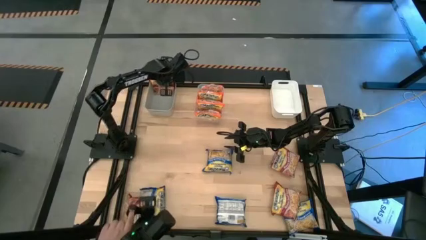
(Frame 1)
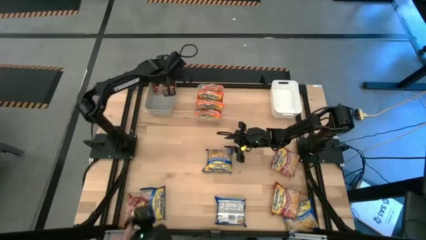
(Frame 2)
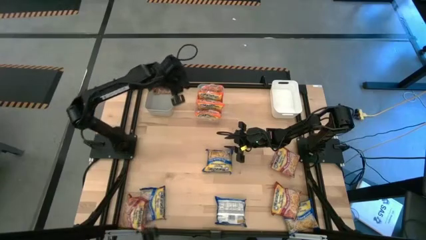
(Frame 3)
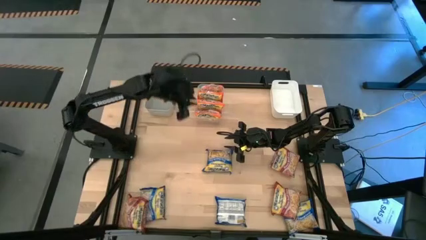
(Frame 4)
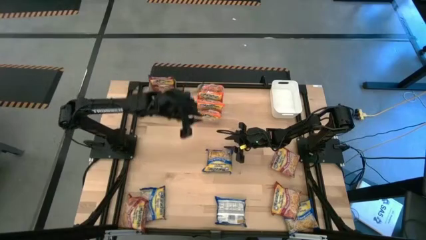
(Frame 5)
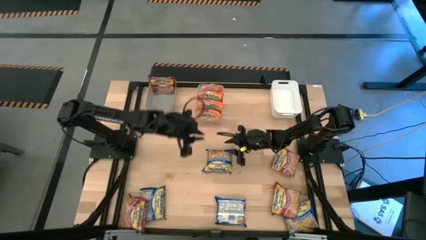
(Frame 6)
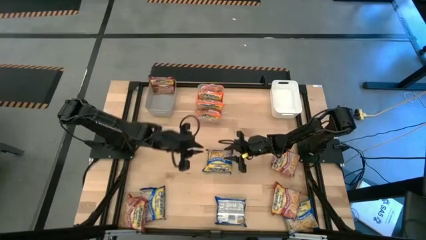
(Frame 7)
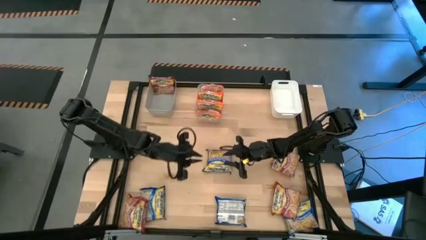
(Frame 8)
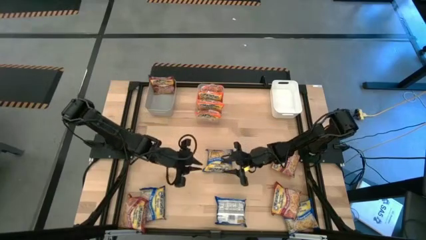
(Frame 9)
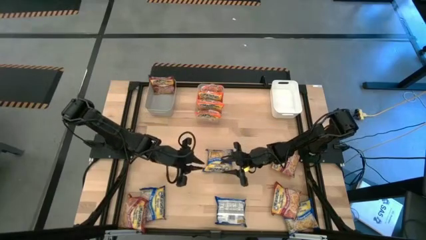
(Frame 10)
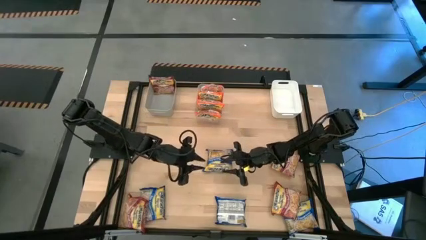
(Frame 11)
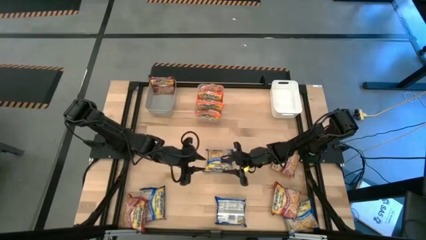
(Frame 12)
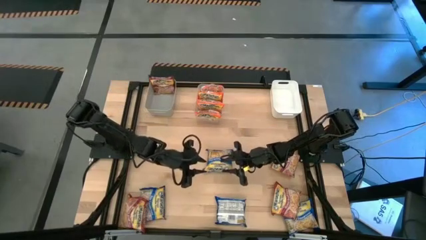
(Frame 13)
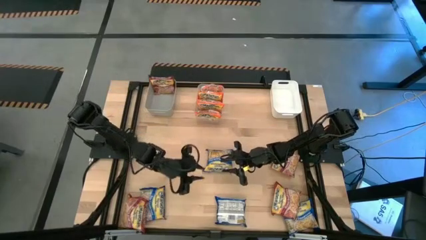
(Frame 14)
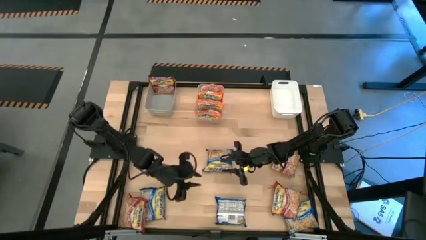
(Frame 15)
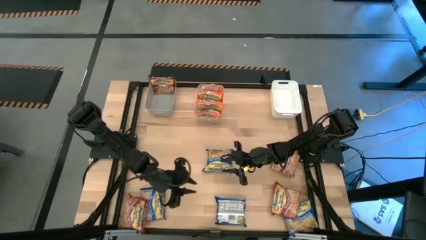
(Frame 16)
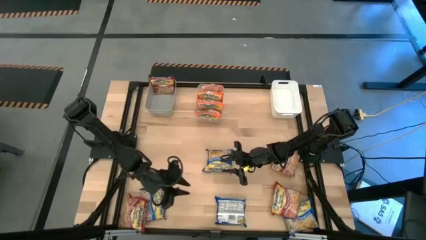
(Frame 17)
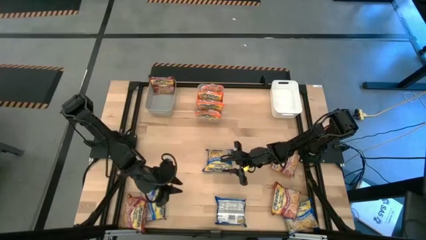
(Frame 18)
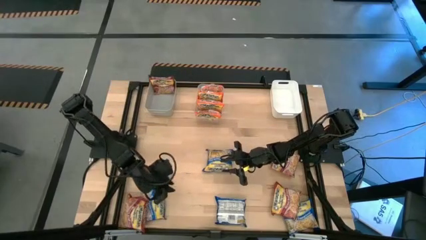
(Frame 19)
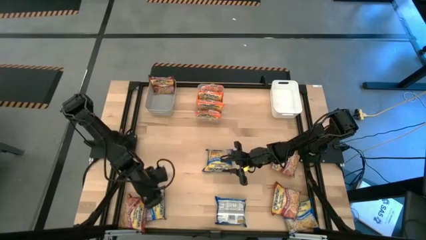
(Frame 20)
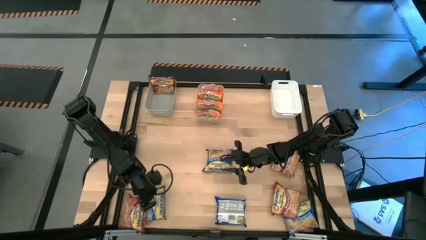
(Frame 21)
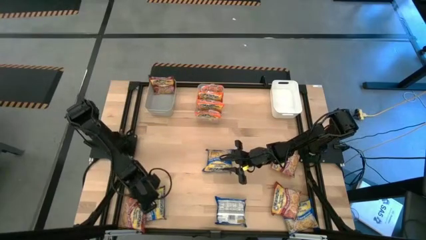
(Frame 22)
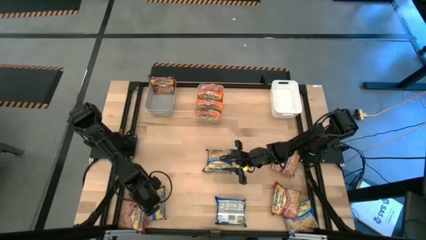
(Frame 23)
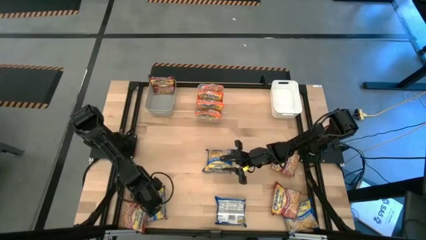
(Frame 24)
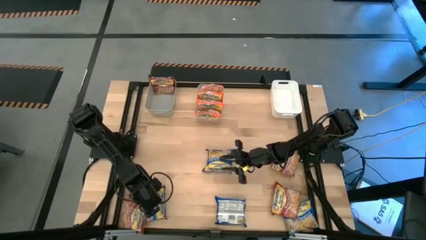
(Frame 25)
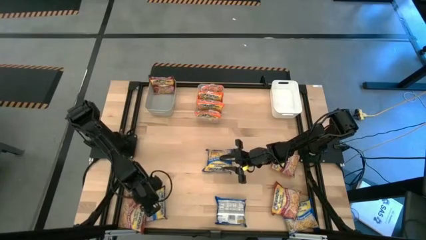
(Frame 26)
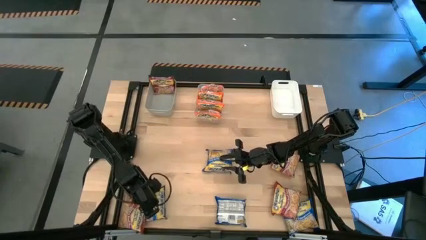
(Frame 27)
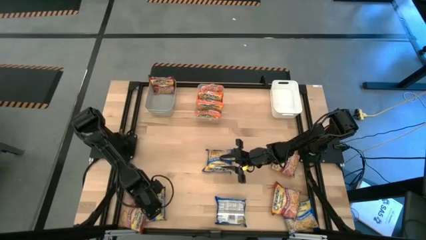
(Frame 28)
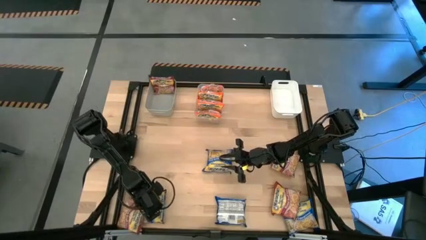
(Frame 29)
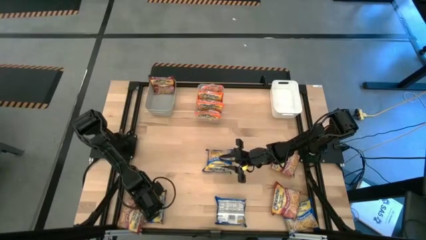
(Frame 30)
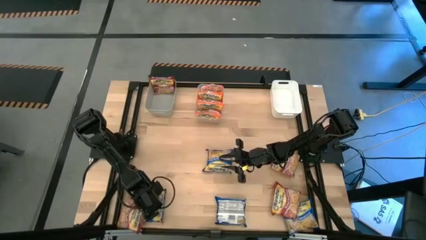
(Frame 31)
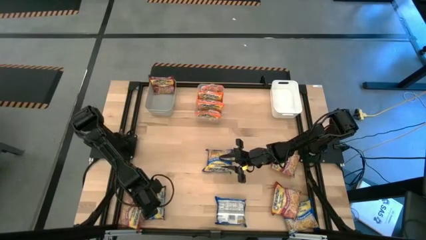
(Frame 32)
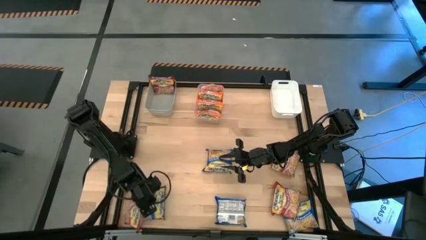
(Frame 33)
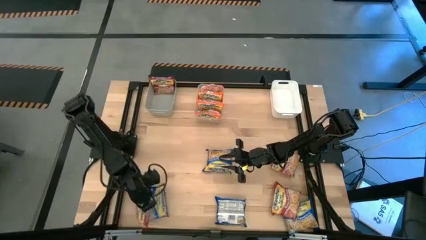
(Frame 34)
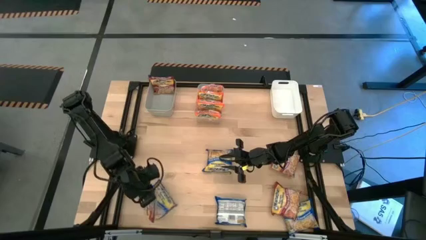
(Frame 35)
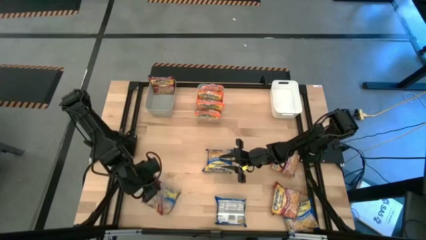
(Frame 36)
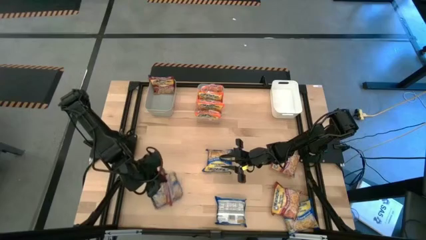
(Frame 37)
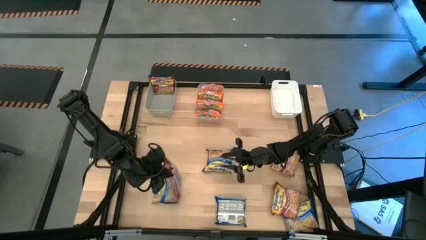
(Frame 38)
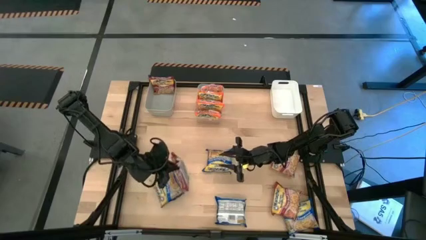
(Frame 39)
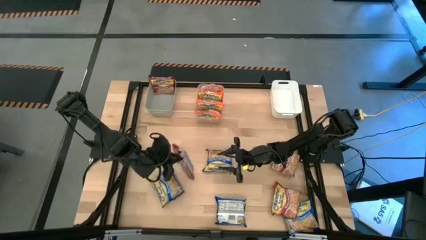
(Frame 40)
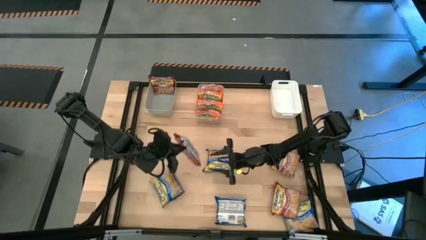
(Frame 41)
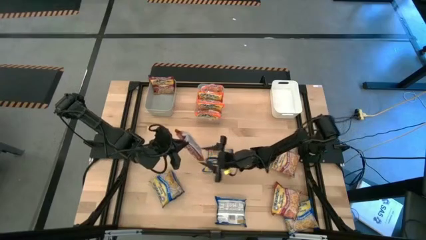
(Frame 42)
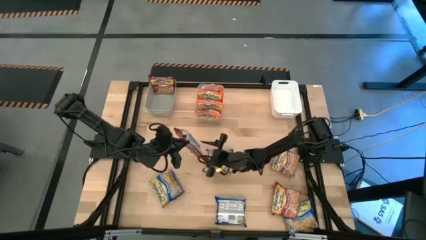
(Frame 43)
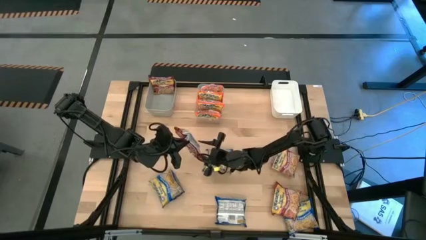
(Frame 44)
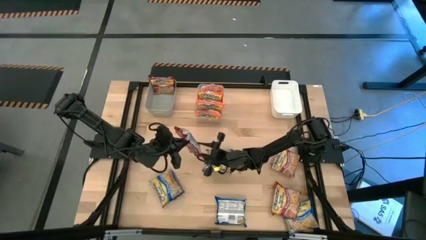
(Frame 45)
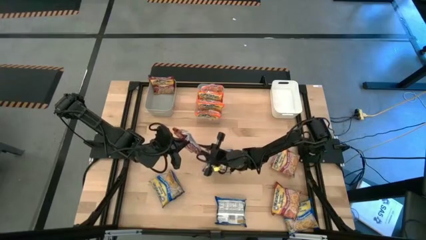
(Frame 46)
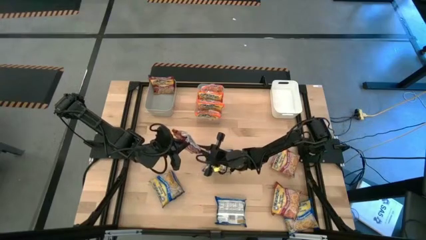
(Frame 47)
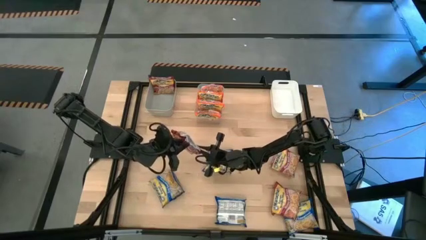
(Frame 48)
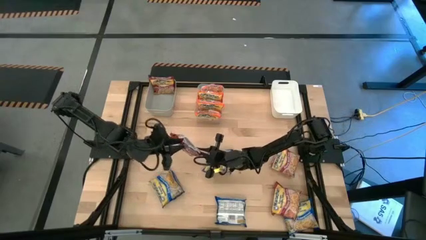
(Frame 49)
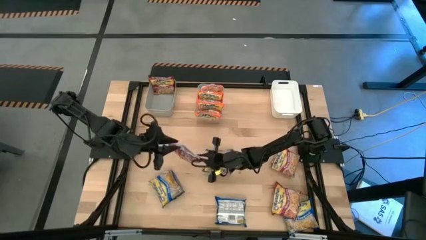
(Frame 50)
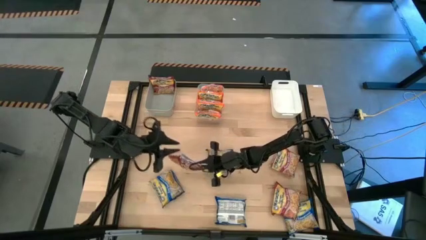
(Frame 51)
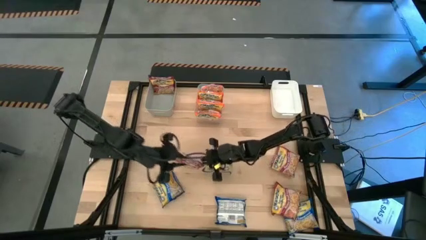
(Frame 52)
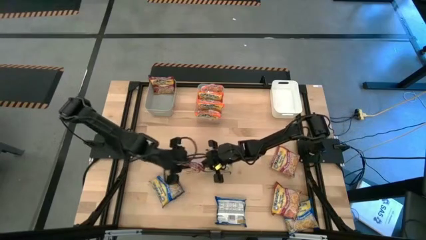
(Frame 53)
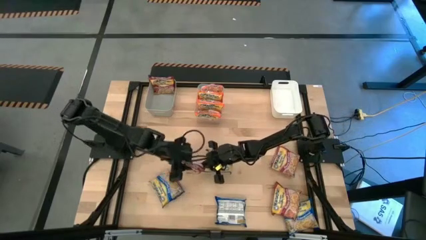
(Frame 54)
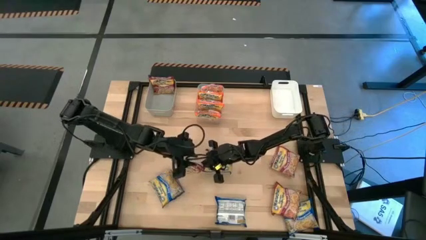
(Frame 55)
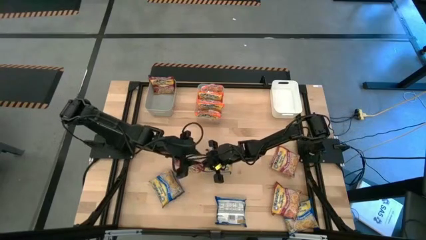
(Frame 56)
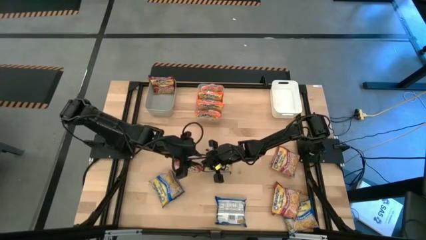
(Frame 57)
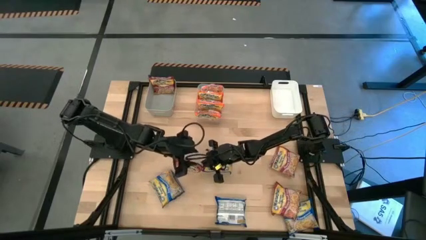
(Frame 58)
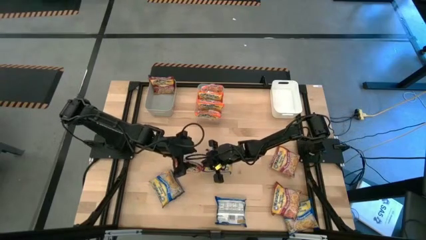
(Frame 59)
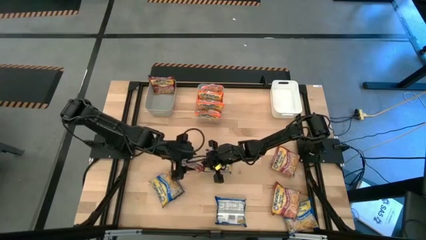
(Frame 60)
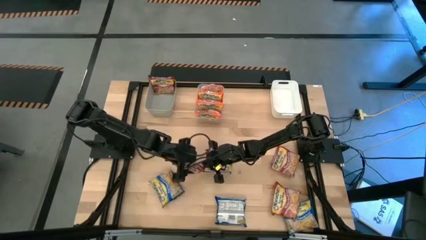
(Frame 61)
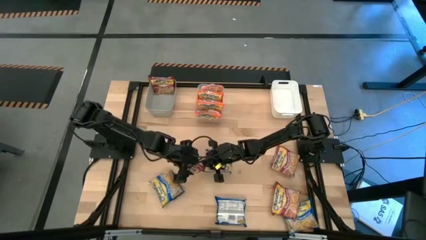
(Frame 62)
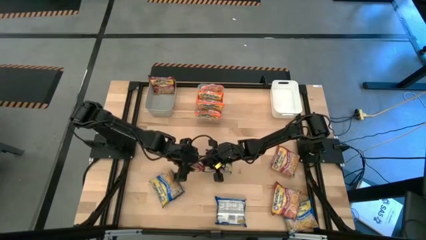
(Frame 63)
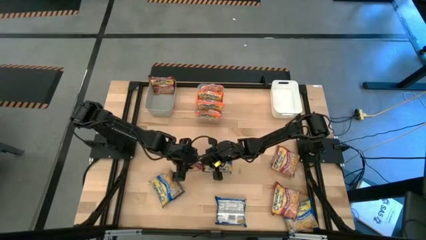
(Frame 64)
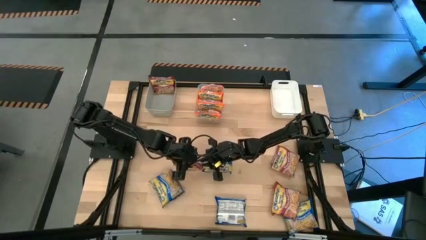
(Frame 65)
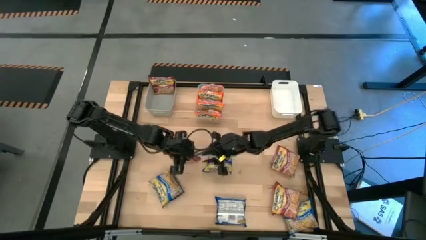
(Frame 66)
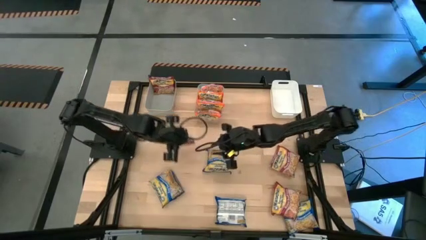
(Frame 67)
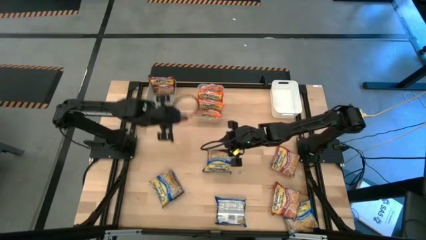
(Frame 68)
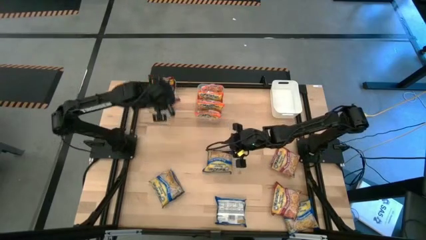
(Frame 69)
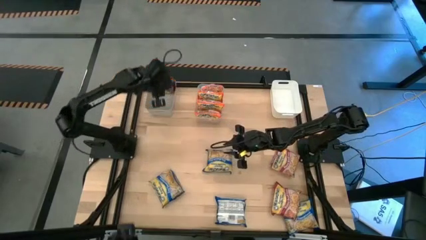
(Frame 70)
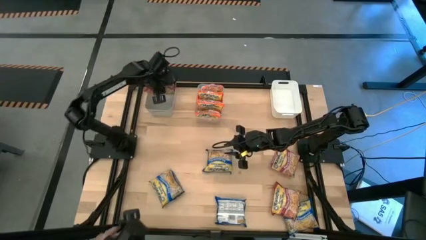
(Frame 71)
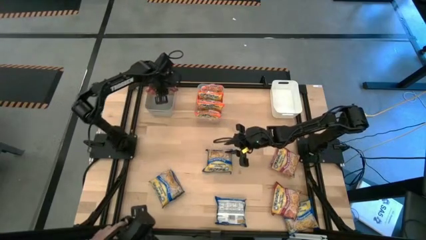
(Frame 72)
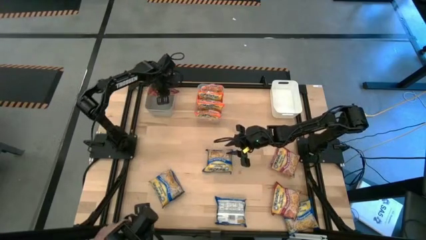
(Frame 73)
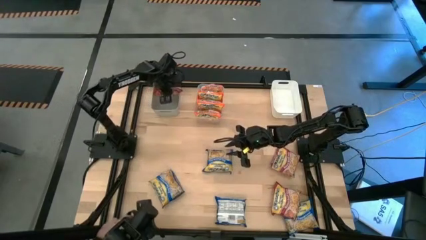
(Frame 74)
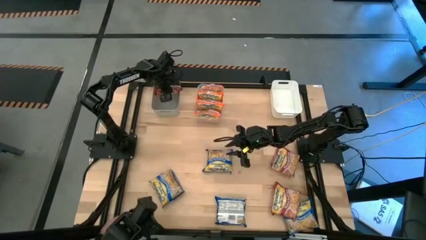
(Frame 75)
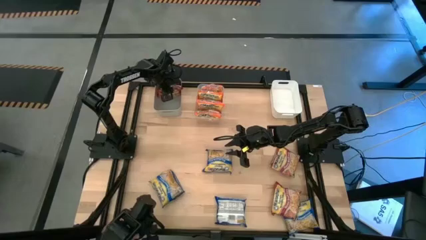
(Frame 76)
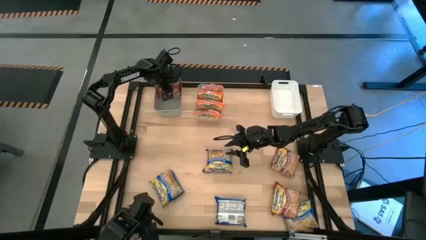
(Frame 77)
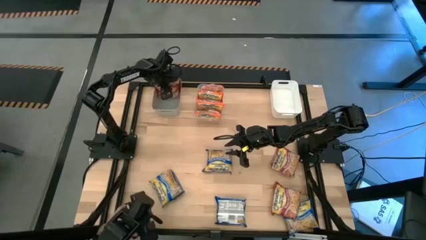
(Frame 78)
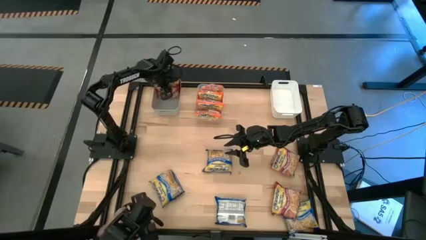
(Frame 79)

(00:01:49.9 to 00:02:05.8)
Task: Sort Maruchan noodles
Put the bottom left red noodle into the gray bin
